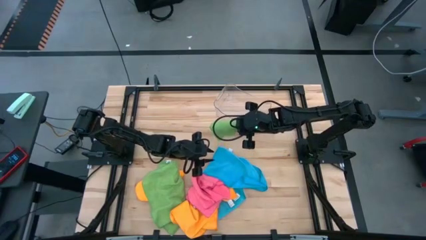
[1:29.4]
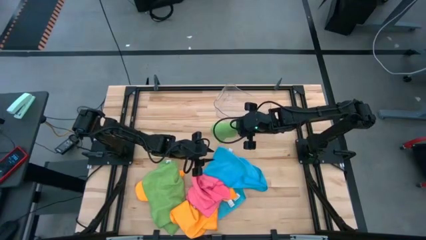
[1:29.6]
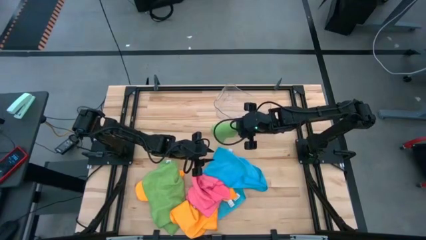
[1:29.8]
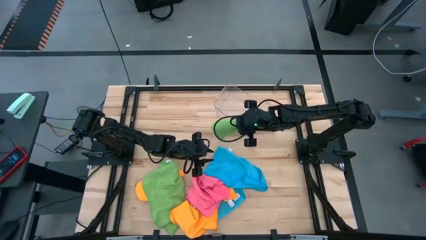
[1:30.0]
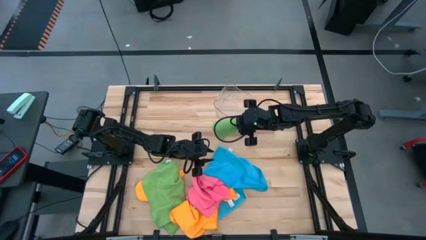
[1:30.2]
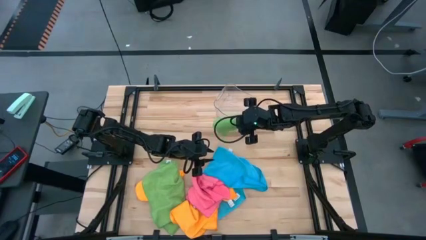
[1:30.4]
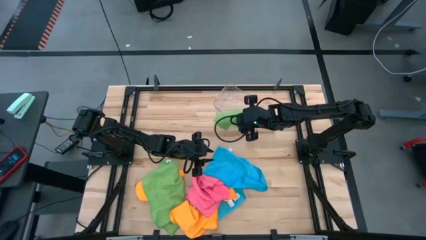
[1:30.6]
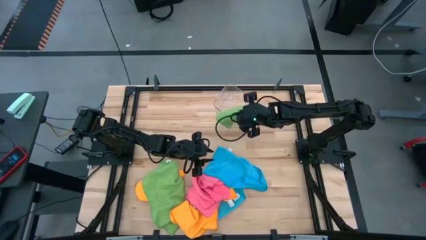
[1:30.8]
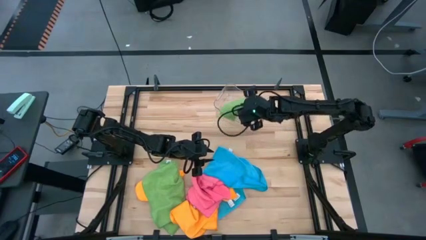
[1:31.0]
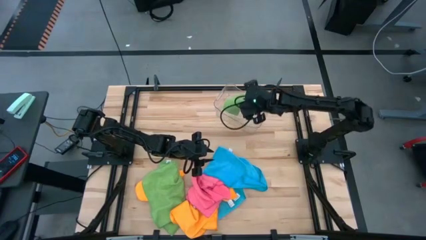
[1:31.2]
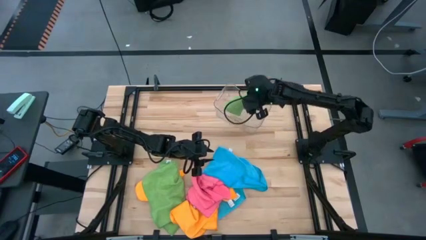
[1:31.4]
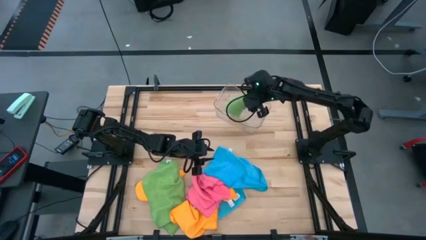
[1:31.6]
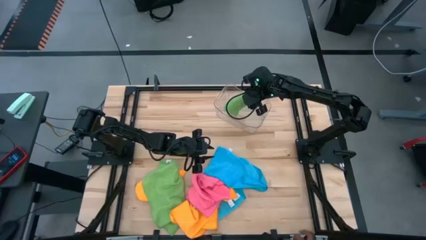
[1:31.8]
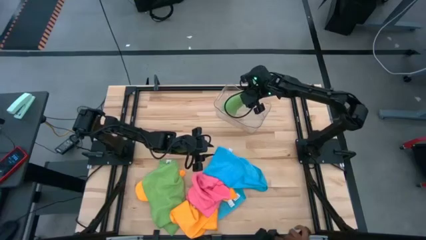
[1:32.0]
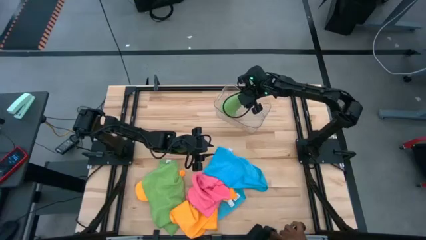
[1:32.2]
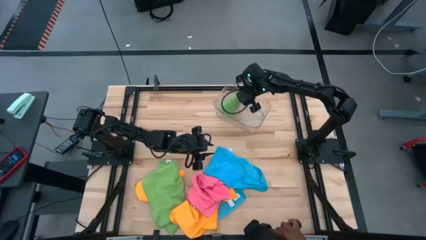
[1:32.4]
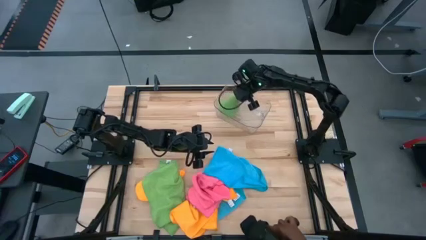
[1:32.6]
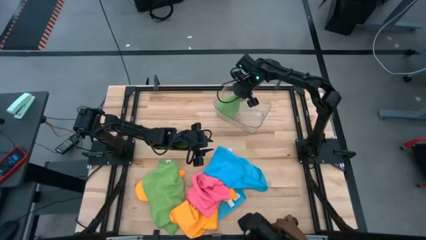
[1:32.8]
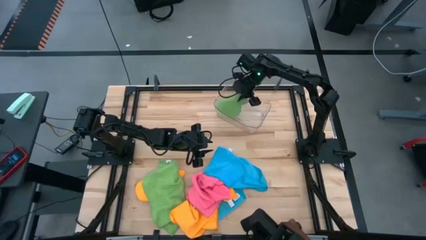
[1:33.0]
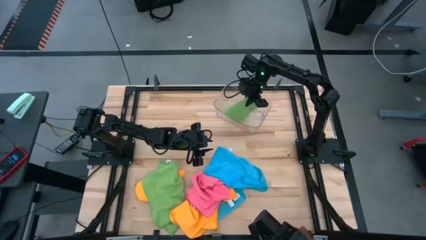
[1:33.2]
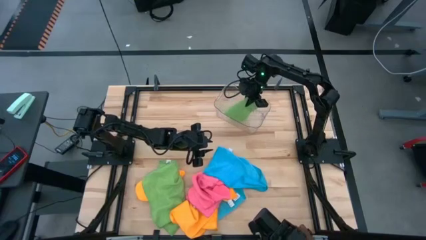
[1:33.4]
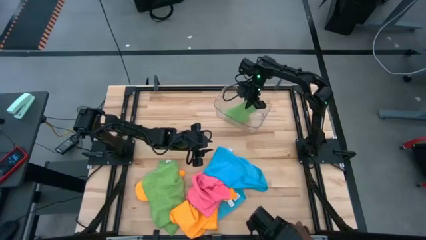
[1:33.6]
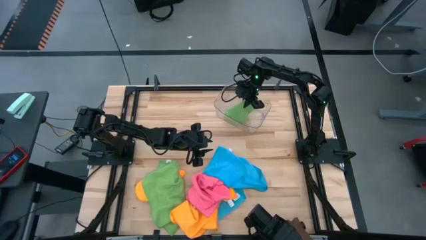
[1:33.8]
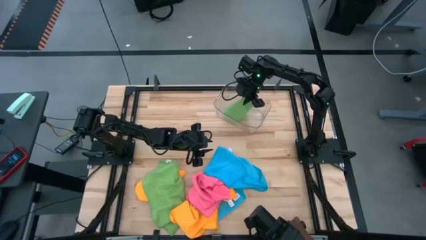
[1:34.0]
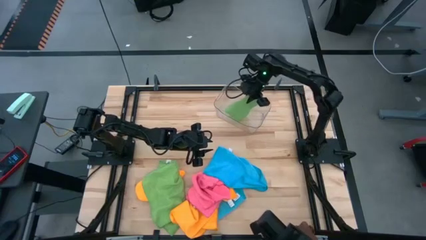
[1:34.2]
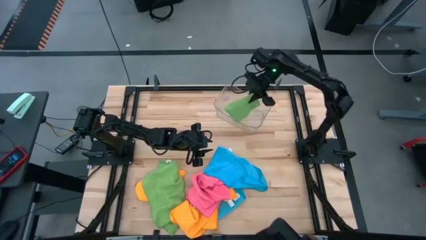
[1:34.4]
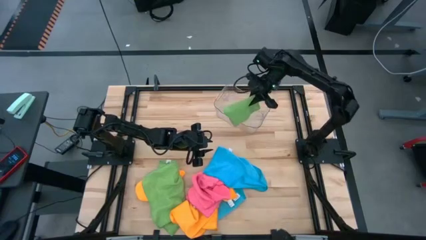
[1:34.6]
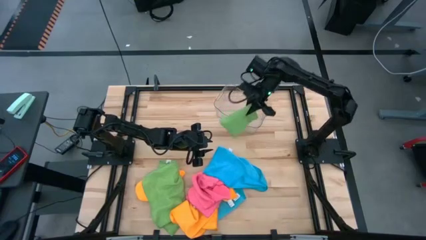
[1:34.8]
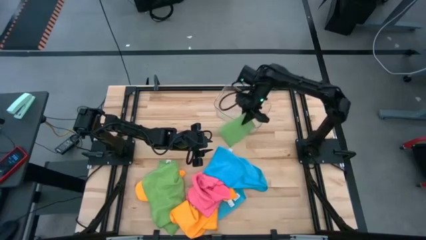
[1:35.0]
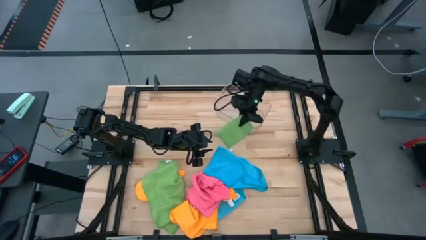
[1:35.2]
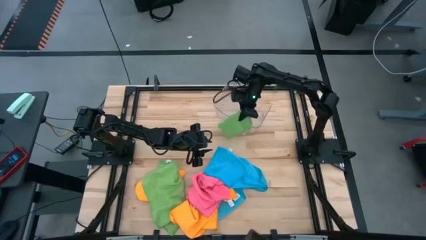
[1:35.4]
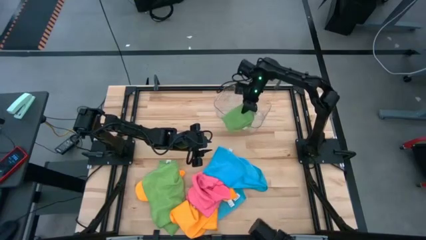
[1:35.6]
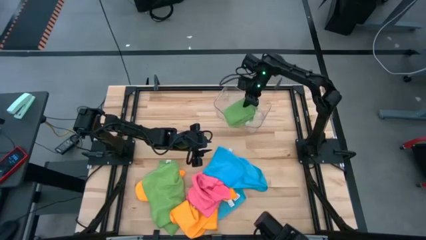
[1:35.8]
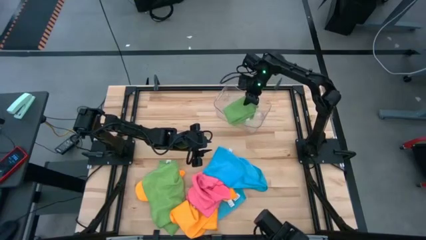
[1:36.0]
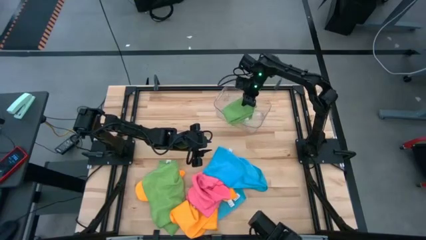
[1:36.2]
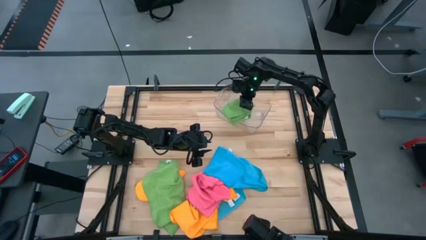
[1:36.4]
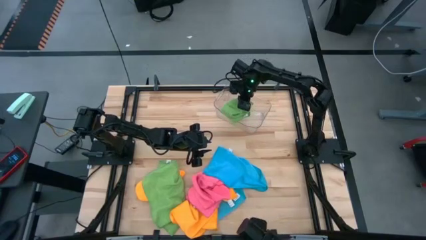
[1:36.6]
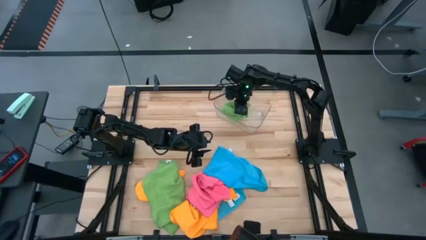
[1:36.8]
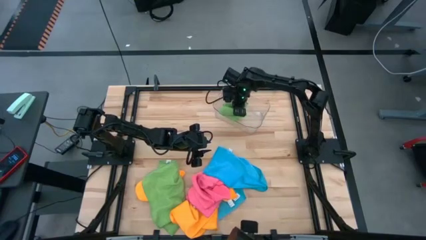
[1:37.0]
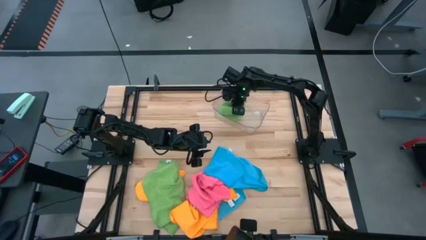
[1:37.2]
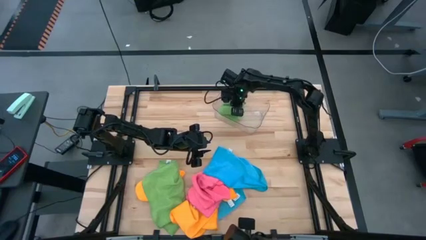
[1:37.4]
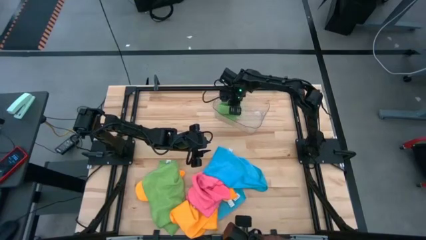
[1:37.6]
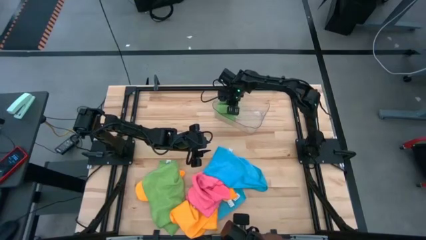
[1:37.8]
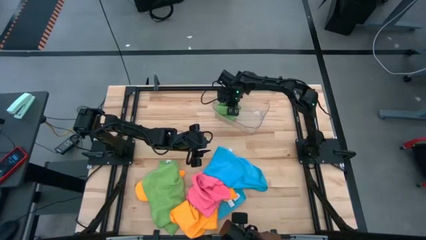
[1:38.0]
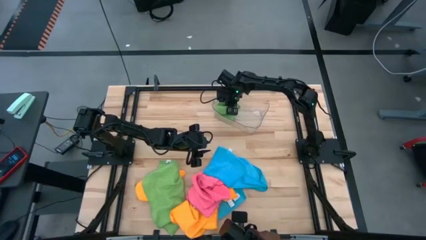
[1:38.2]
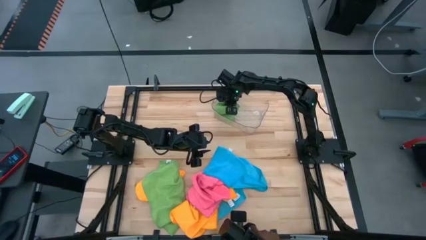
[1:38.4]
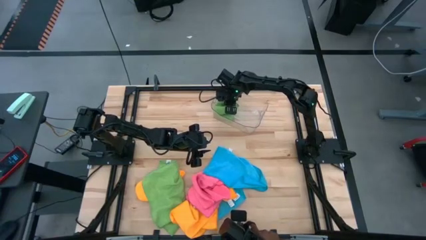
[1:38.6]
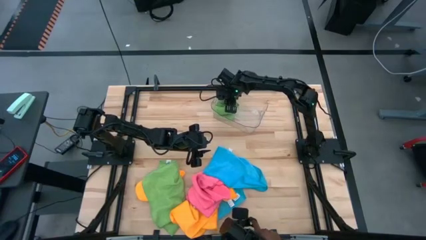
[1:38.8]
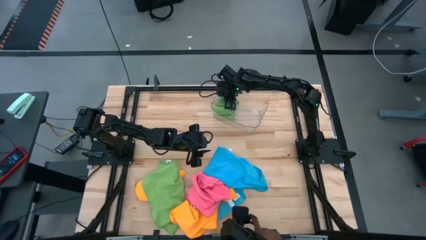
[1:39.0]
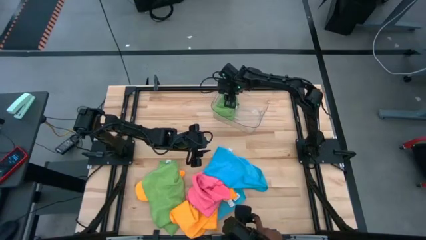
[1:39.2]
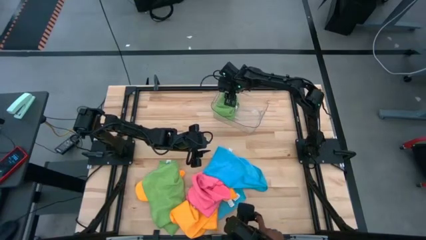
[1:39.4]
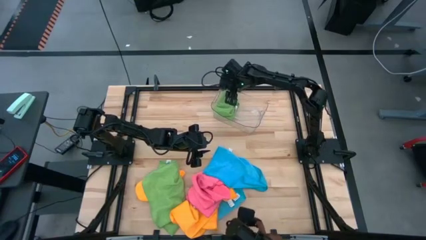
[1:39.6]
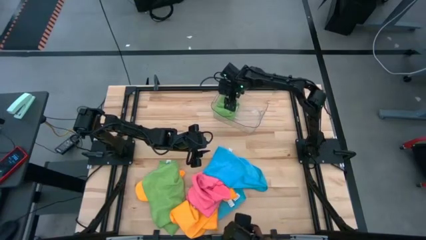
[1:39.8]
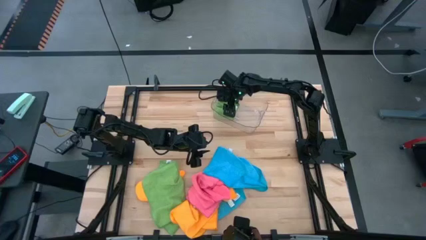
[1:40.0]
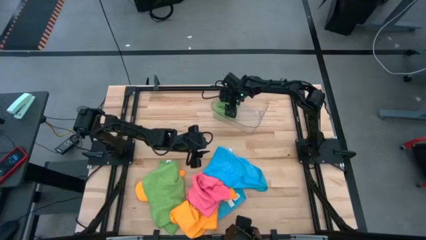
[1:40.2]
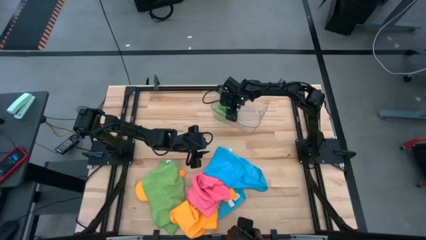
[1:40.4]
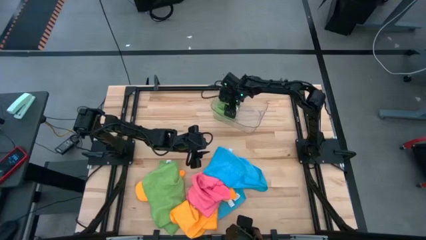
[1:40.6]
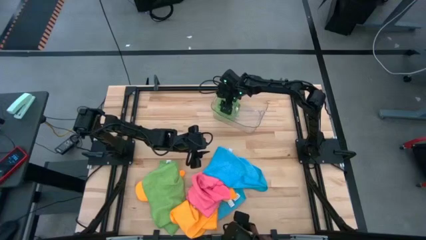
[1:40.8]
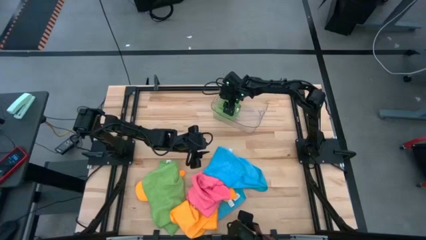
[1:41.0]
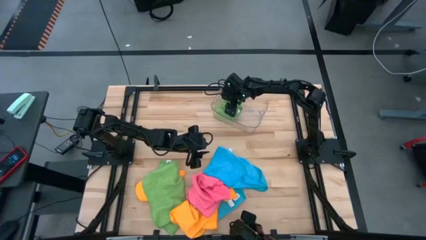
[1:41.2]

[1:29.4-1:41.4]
Task: Fold microfiber towels
Put the top green towel into the transparent bin

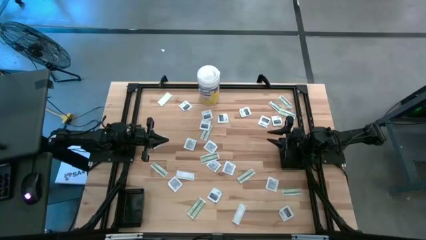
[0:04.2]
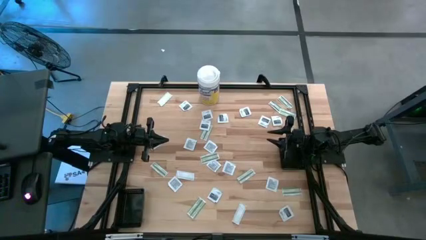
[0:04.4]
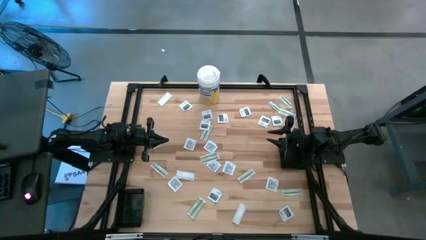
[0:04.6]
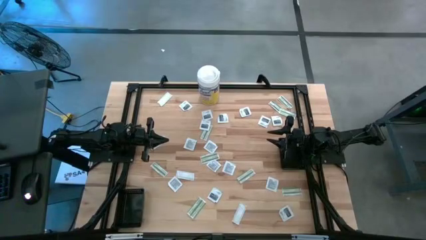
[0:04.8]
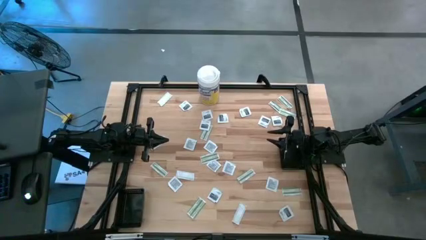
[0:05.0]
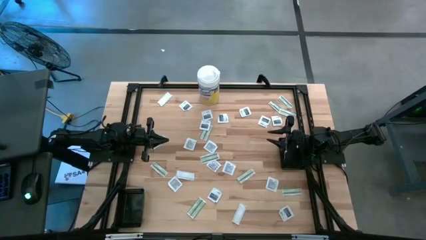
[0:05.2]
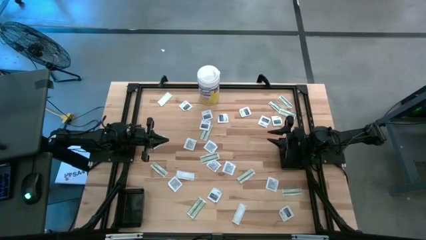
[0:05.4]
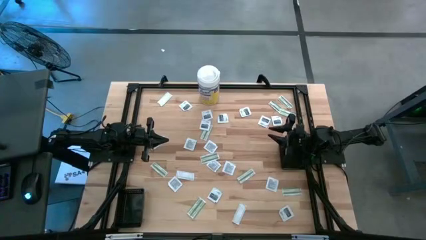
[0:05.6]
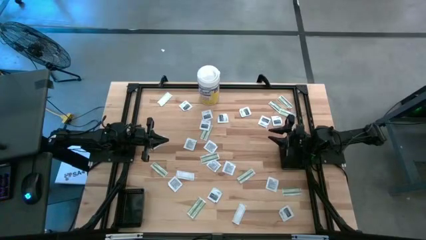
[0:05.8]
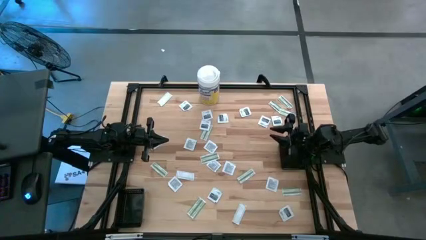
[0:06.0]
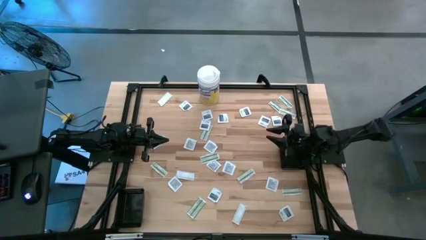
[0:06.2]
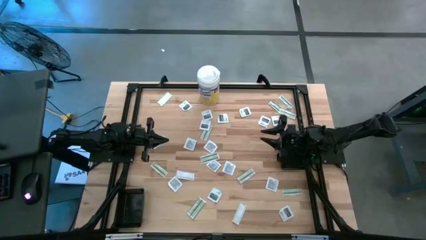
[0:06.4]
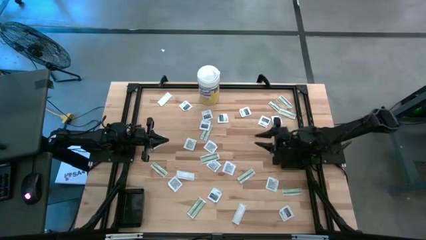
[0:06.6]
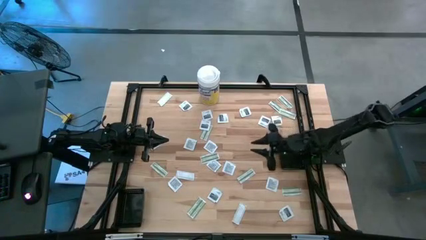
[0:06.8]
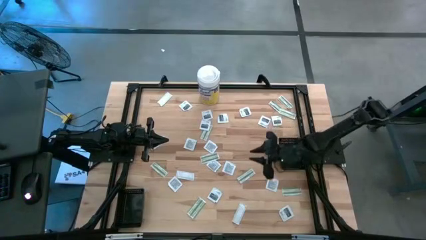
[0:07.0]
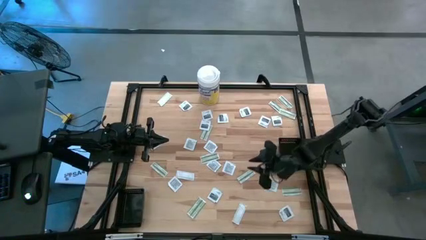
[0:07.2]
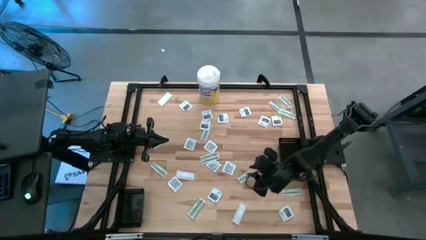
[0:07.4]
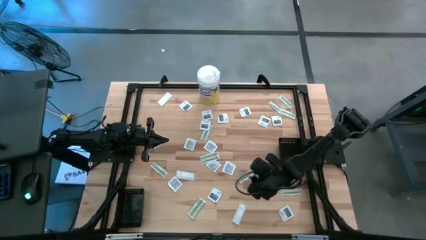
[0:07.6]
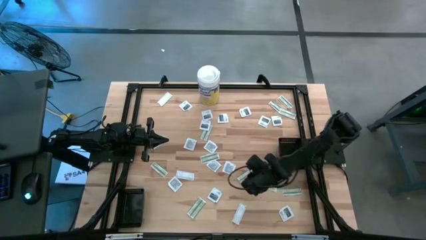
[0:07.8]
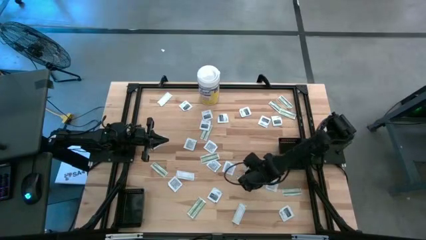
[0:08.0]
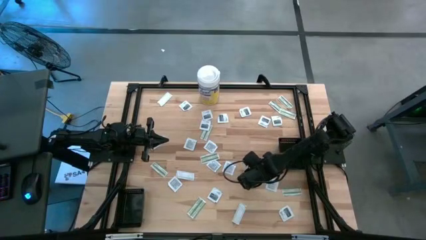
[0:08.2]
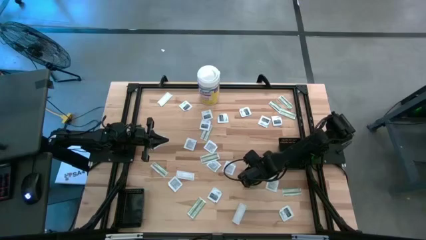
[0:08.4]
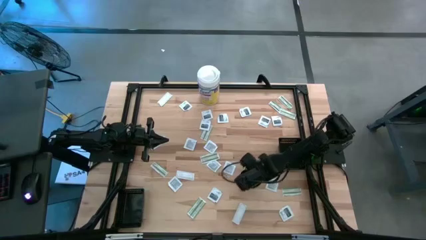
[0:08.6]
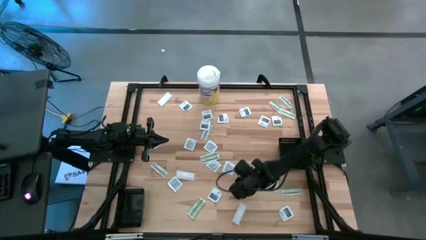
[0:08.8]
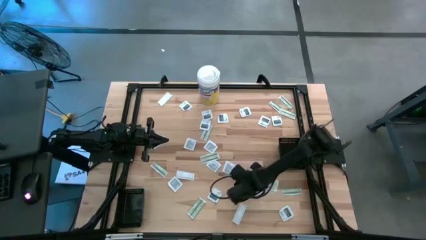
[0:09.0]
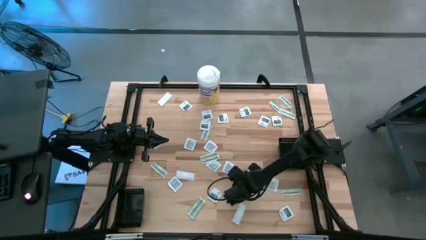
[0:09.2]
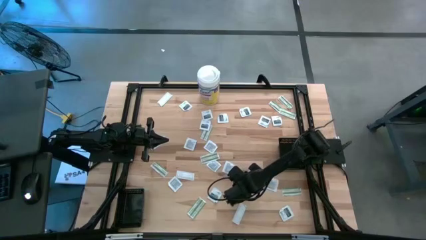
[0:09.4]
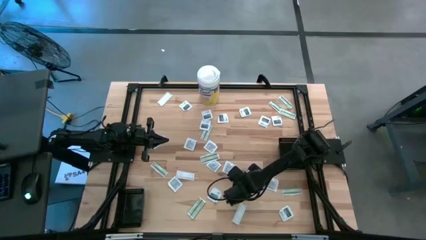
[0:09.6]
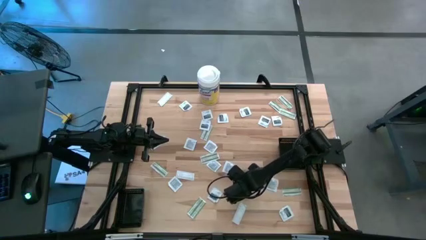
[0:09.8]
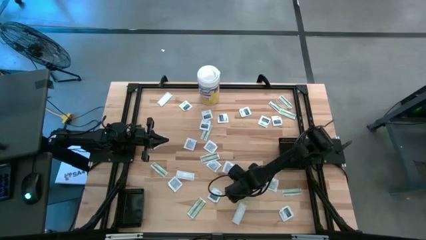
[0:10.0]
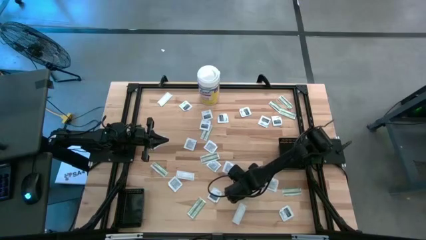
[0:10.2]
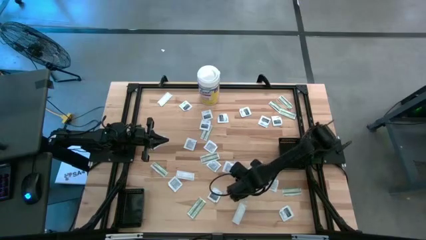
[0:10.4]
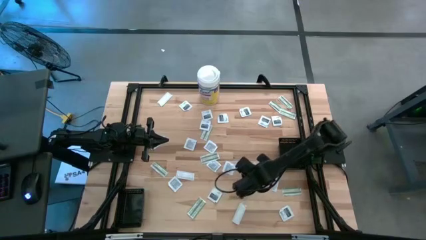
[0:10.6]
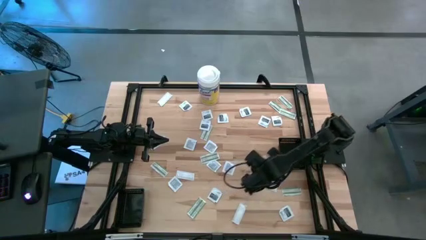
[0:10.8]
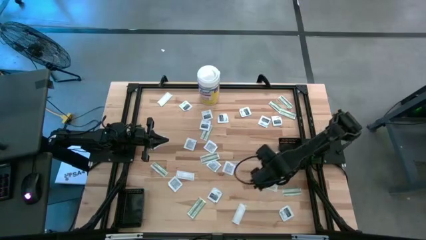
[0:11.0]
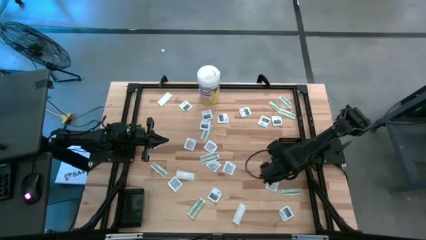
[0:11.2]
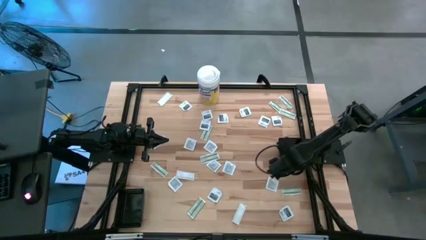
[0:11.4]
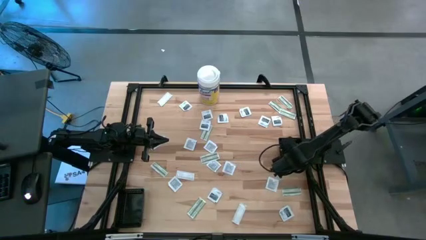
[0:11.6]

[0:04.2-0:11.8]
Task: Pick & Place First Aid Supplies
Put the white bandage pad into the right black bin
